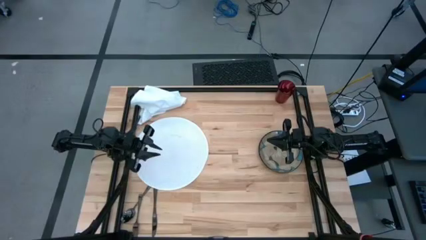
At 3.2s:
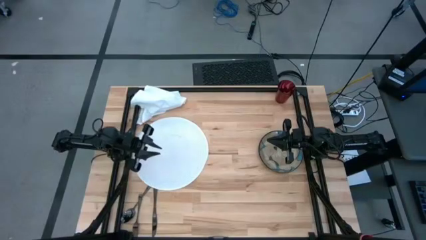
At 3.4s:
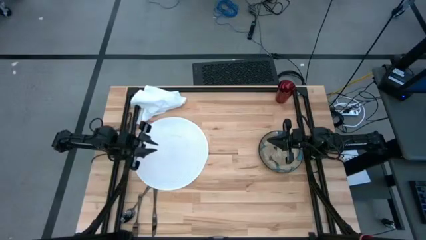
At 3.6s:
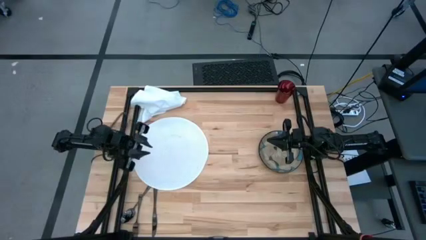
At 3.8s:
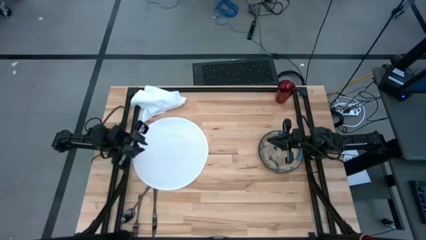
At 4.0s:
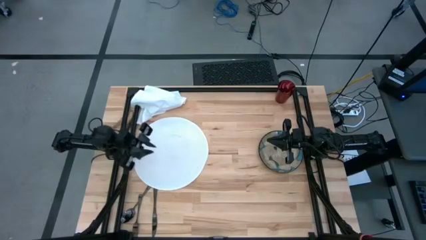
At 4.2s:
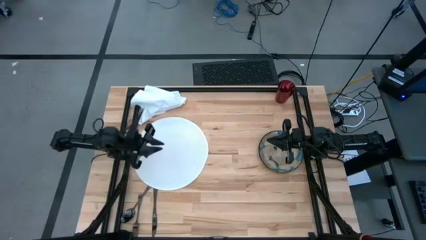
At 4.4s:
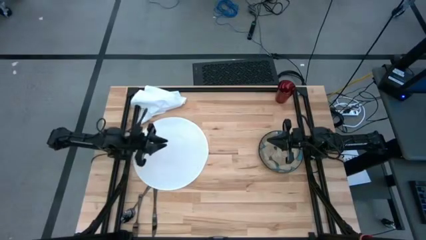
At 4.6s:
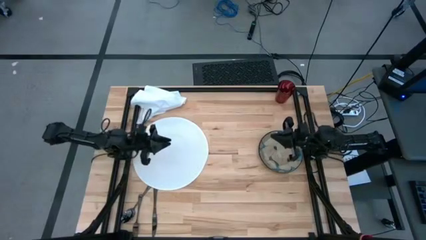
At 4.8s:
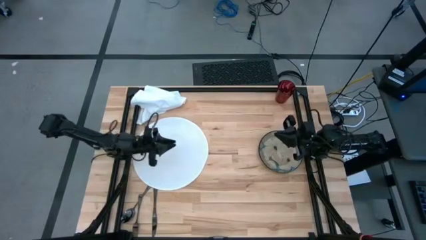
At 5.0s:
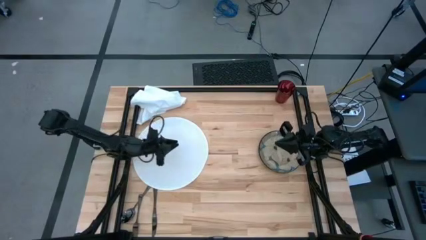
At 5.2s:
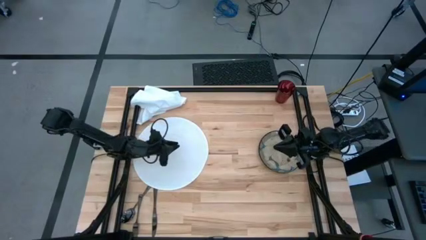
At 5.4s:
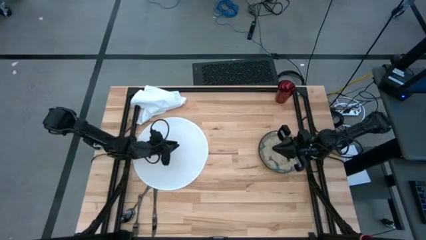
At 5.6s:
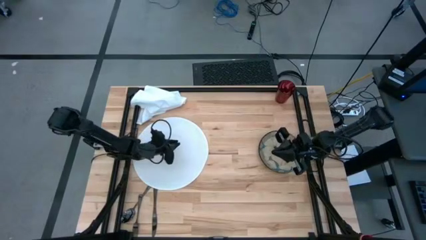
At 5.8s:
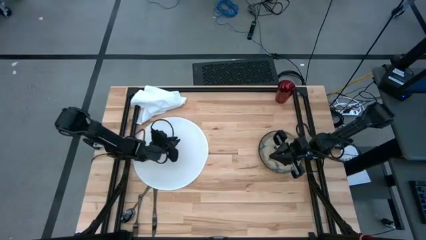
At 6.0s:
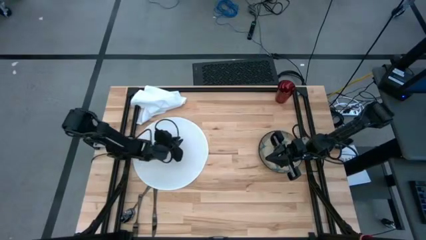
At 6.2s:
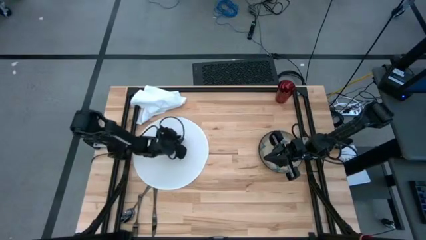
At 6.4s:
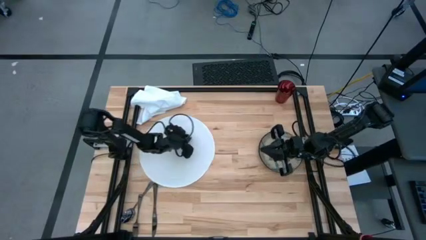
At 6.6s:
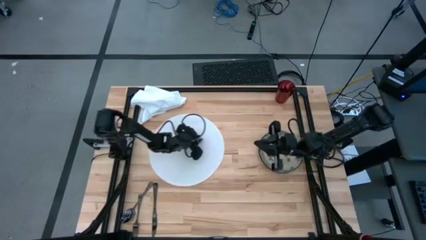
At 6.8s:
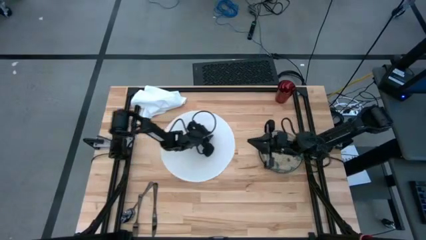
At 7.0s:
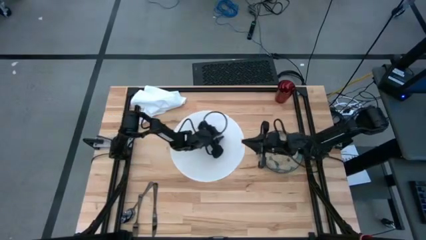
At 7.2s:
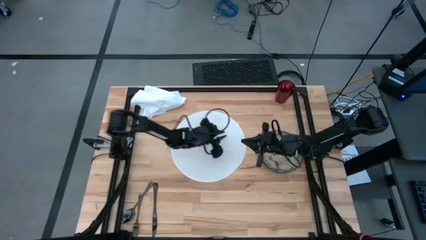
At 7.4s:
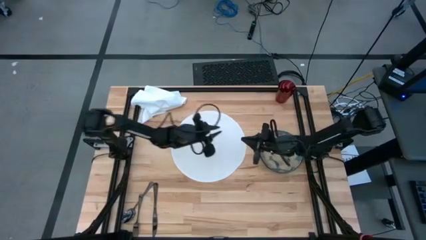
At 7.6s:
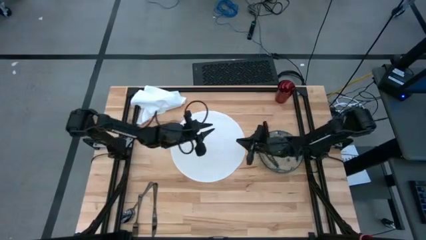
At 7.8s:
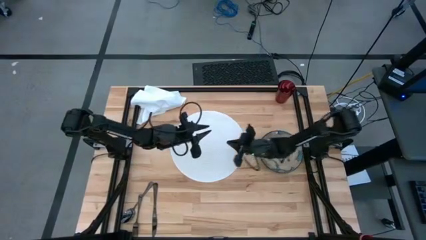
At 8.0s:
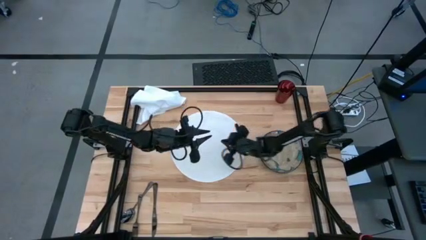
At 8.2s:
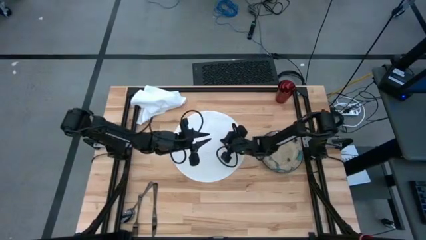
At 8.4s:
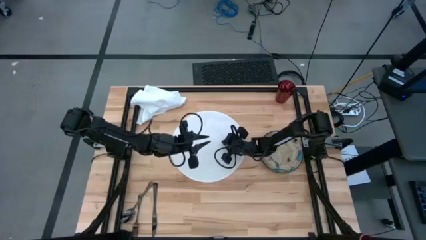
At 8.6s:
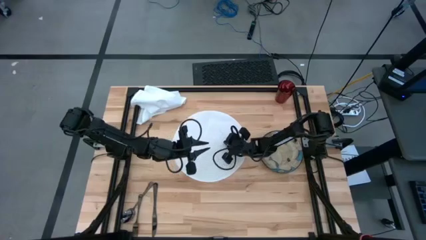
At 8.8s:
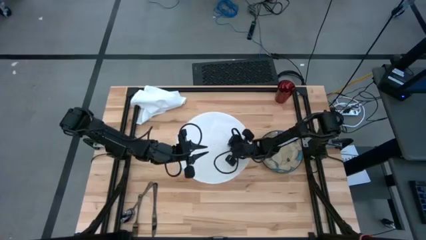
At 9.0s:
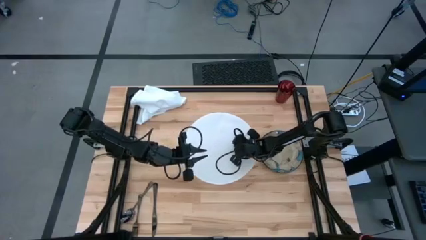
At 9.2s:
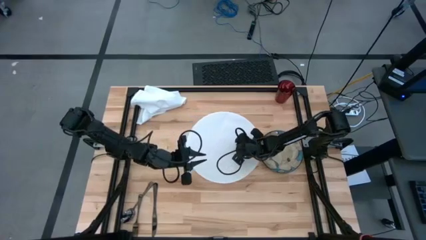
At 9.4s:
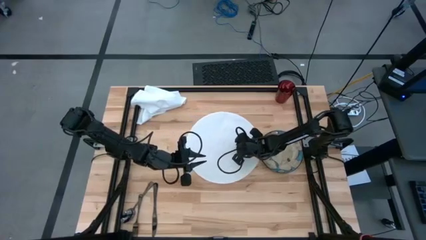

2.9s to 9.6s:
Task: Set table place
Move the white placemat to the center of the table

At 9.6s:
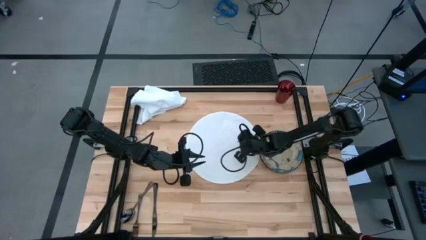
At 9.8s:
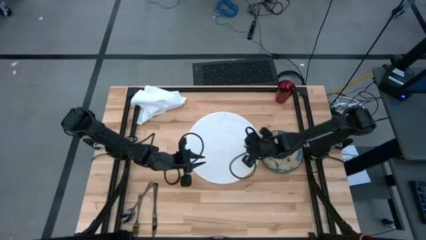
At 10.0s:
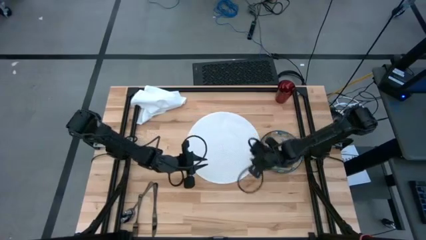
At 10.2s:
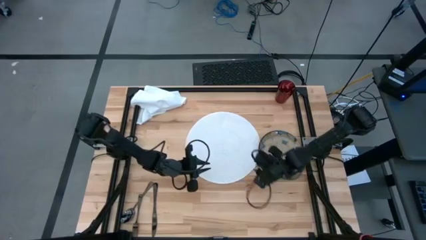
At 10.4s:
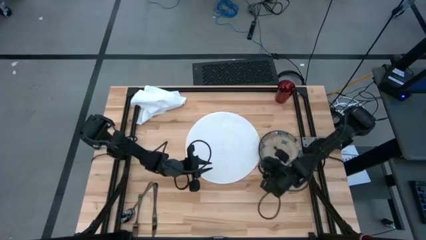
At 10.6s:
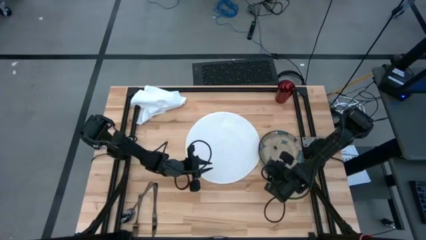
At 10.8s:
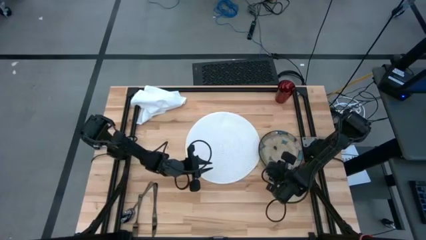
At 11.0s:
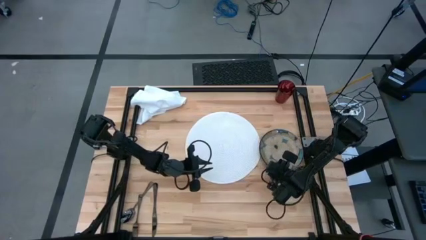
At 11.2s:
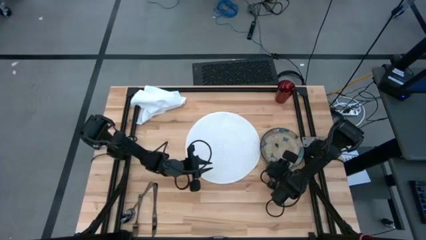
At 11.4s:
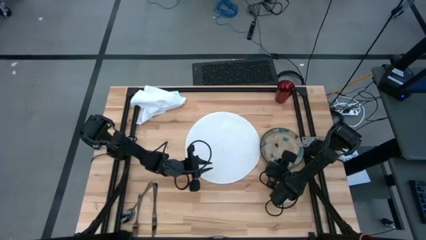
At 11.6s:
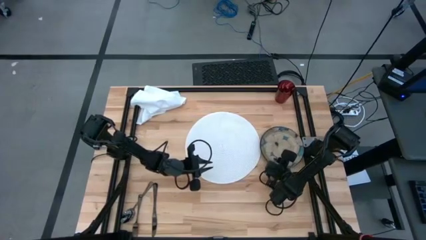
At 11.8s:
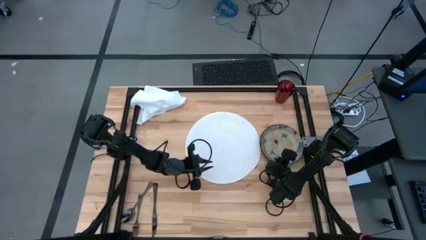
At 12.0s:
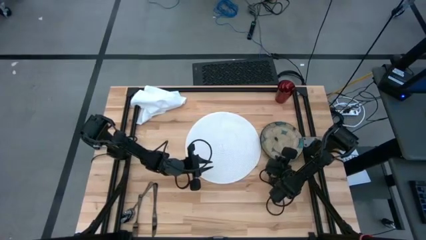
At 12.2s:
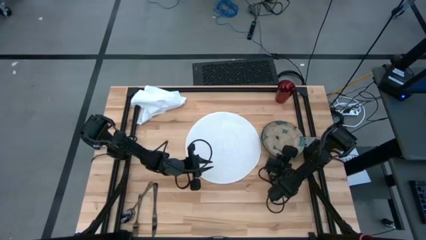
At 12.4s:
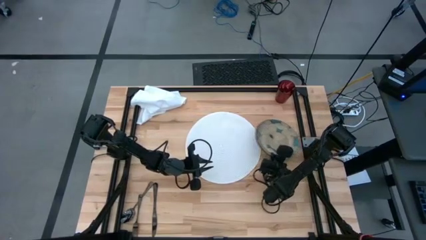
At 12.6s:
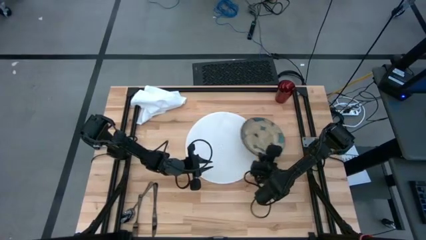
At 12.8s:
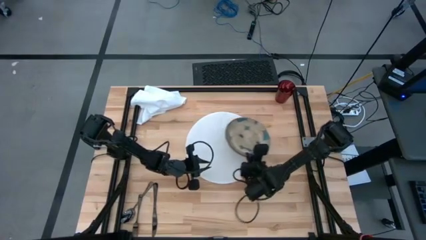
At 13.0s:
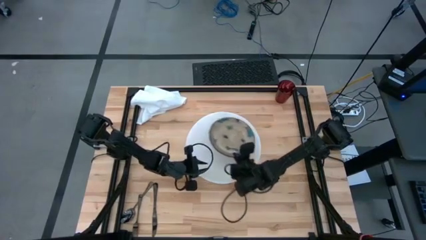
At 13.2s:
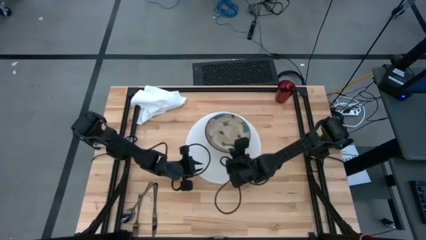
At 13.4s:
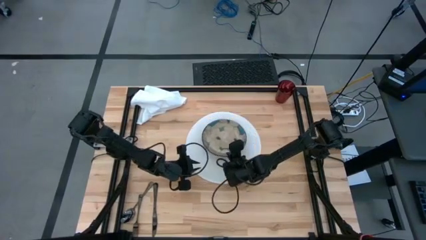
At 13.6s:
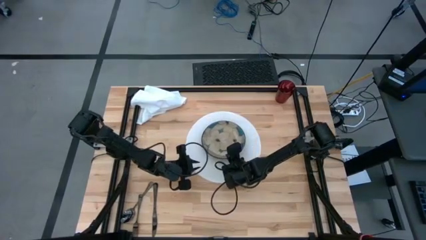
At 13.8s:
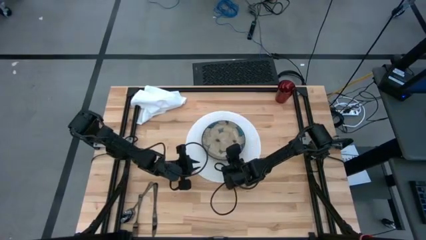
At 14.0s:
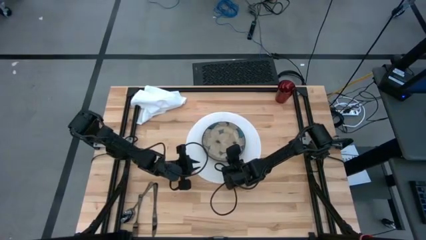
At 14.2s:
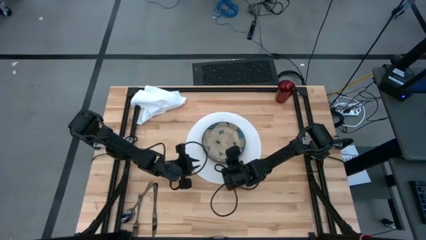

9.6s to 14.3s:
Put the brown plate on the white placemat

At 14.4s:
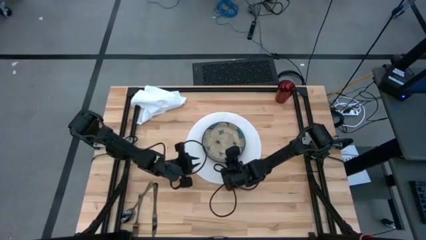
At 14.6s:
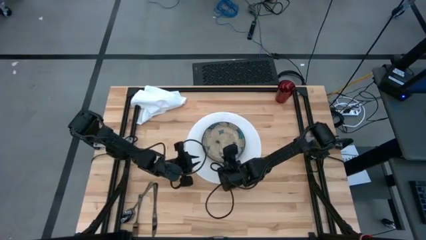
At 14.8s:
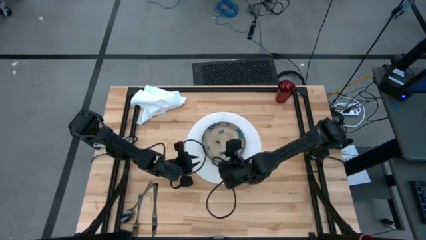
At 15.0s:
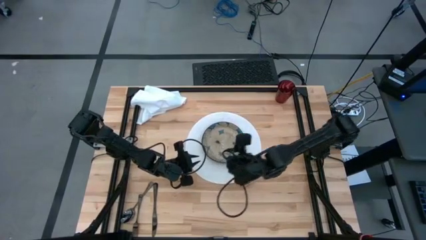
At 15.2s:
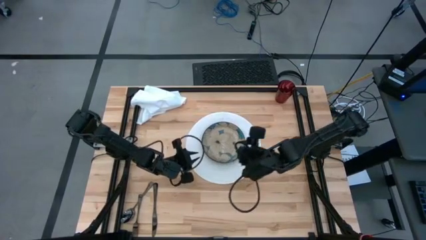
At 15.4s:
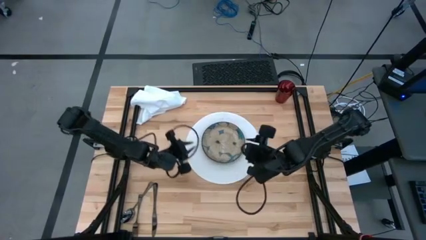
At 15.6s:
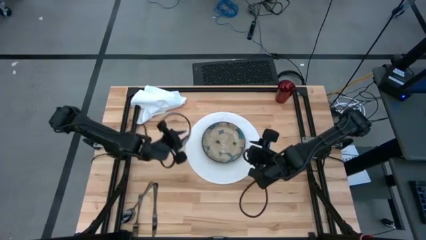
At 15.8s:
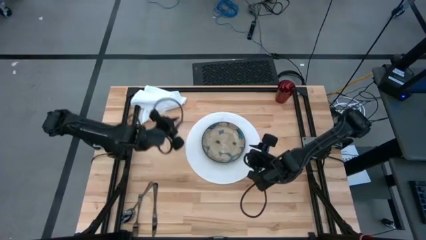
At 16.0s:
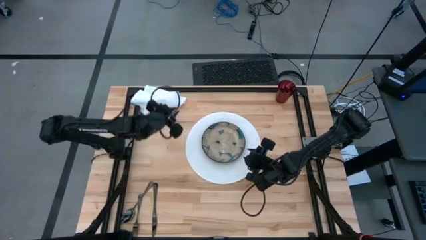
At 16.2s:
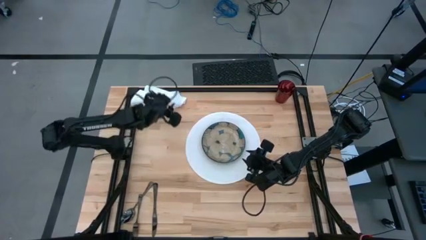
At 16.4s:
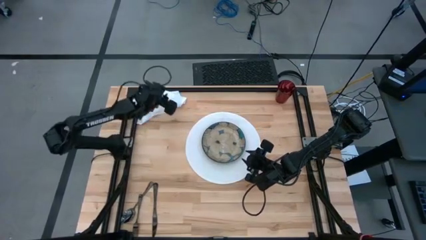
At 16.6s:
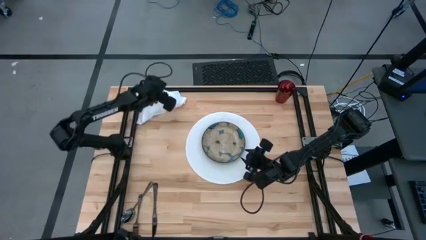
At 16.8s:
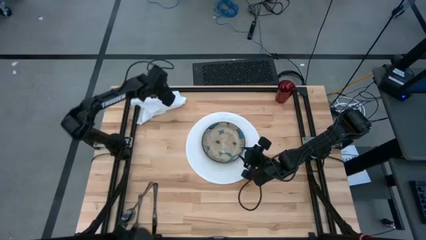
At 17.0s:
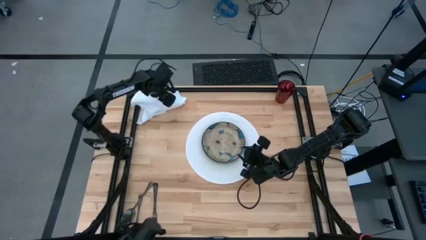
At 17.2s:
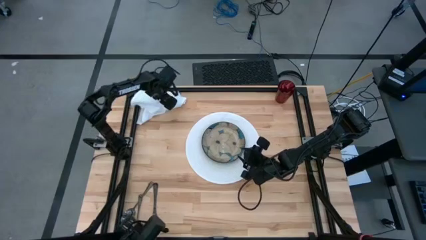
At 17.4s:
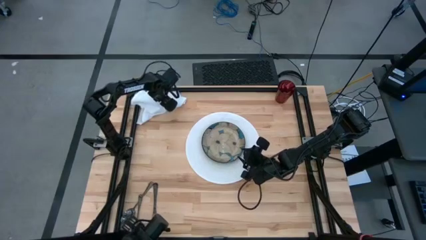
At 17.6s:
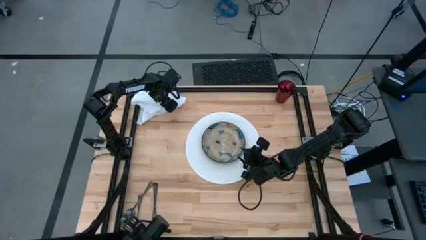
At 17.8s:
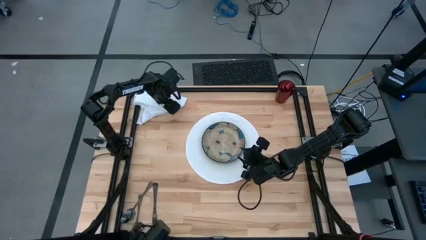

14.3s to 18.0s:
Fold the white napkin

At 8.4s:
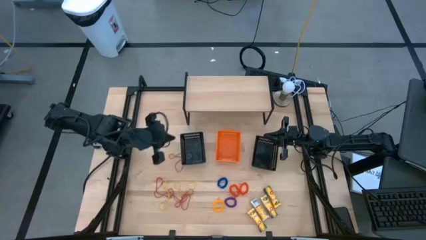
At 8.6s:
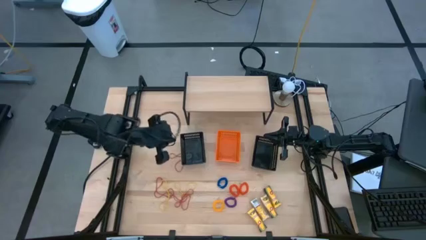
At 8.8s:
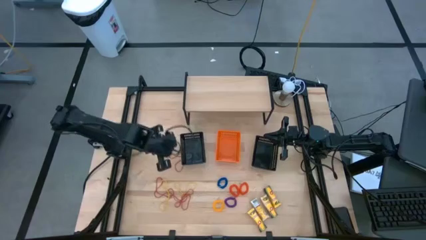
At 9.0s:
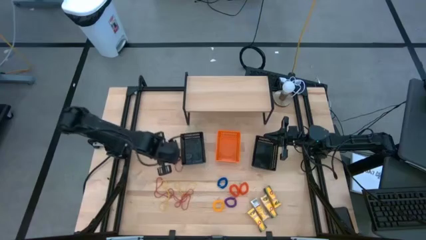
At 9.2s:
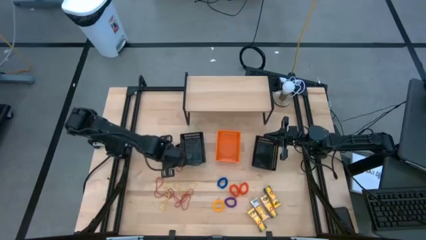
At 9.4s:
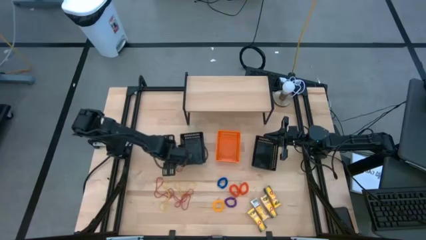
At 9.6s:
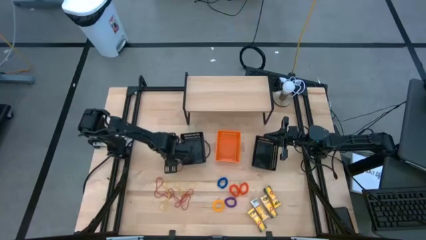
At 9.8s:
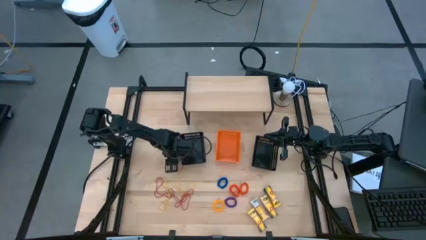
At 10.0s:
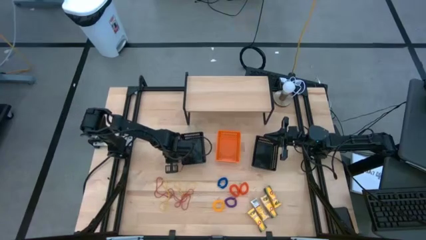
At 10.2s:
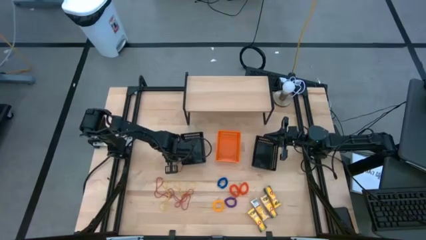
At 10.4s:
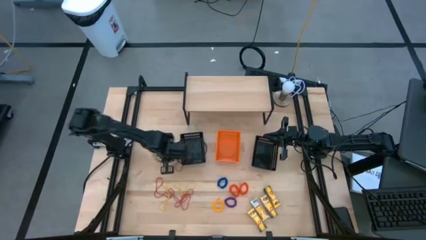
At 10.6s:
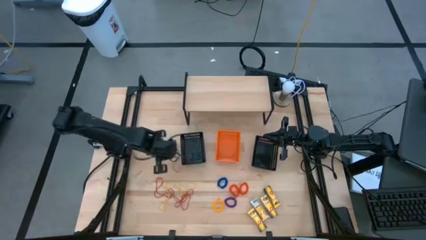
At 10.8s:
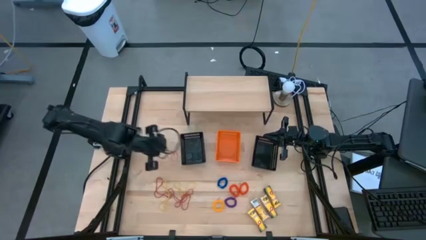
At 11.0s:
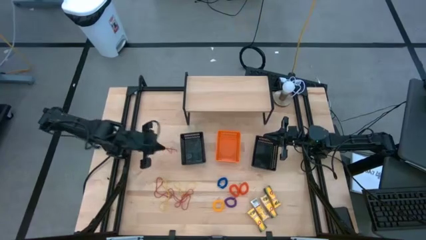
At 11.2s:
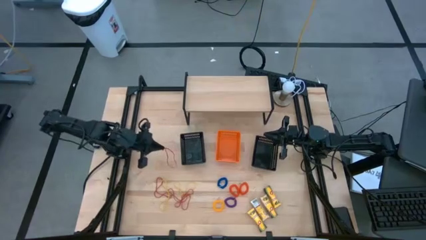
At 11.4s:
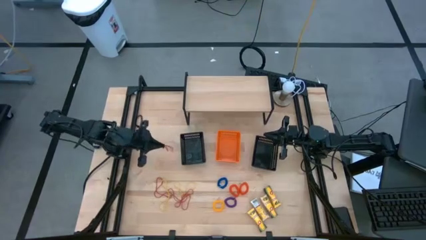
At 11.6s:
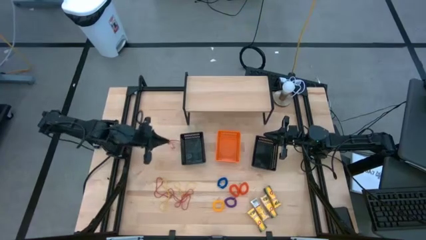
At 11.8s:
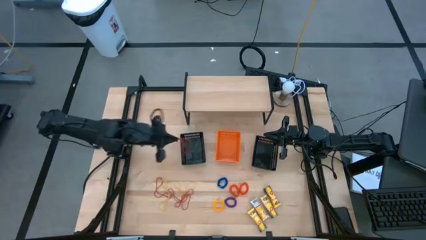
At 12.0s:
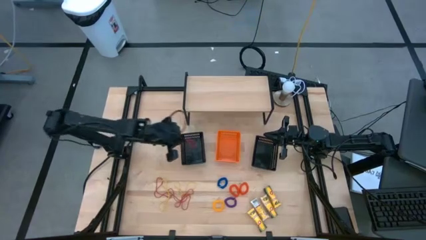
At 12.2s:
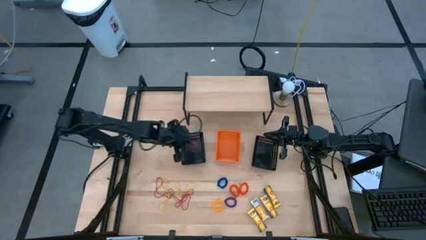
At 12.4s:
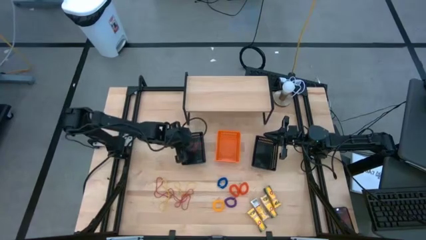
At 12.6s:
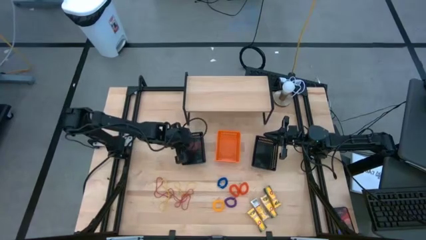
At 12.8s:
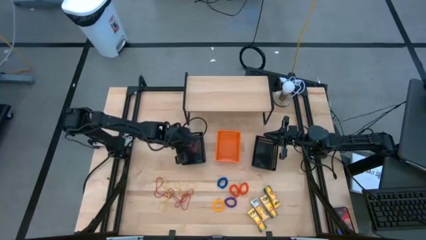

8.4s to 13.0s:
Task: Pick & Place Office Desk Supplies
Put the red rubber band into the left black bin
